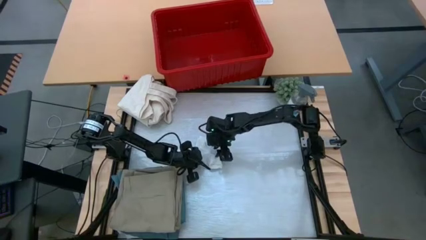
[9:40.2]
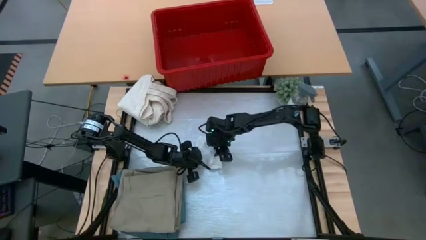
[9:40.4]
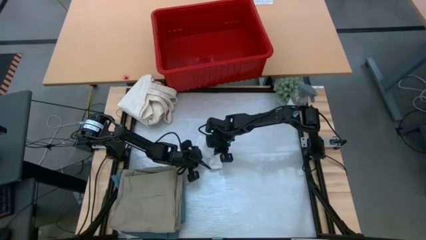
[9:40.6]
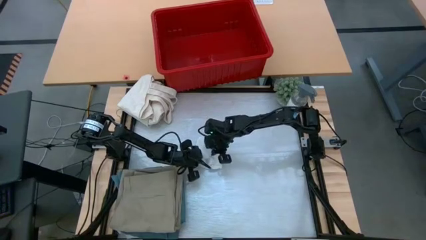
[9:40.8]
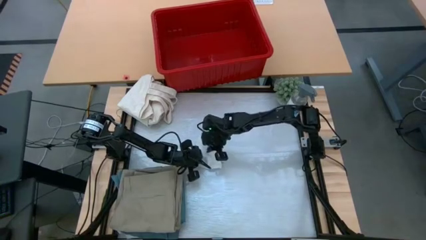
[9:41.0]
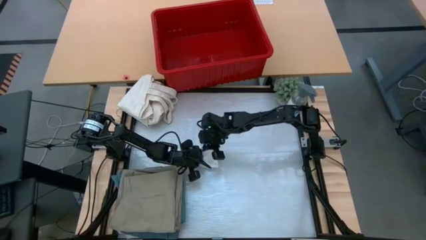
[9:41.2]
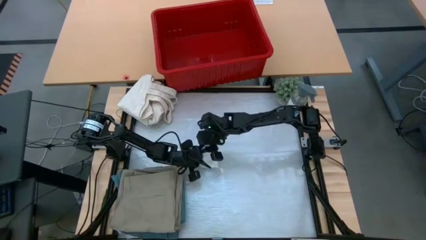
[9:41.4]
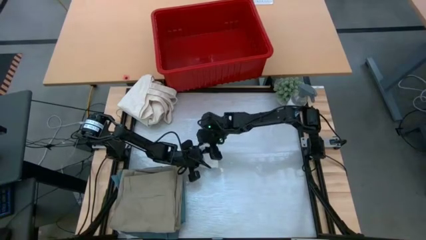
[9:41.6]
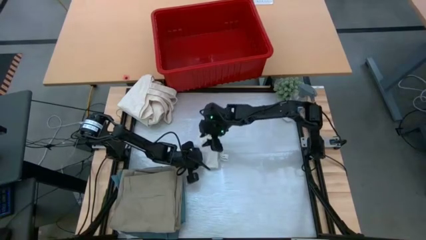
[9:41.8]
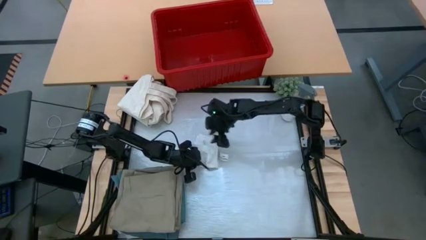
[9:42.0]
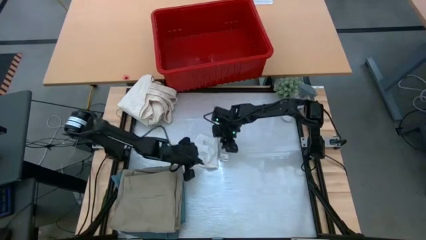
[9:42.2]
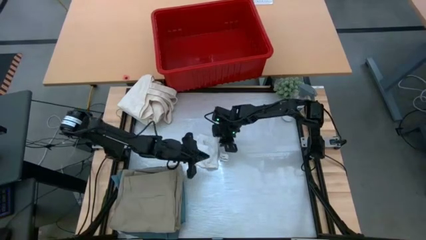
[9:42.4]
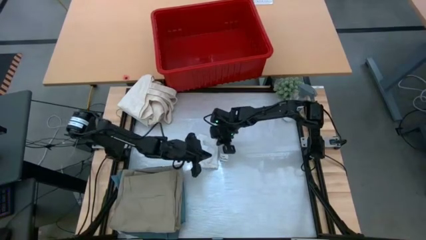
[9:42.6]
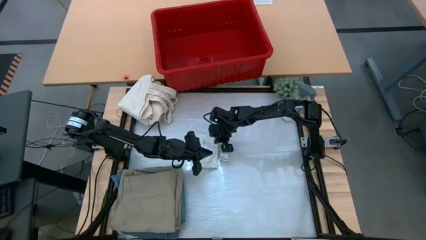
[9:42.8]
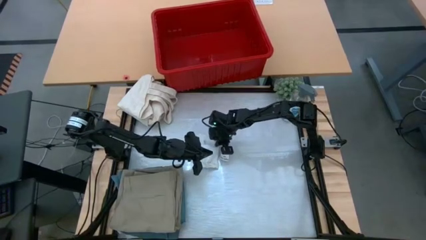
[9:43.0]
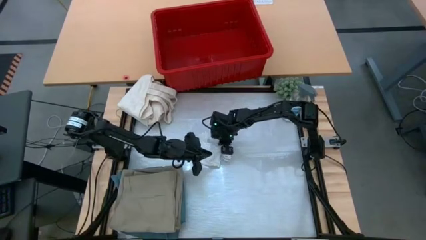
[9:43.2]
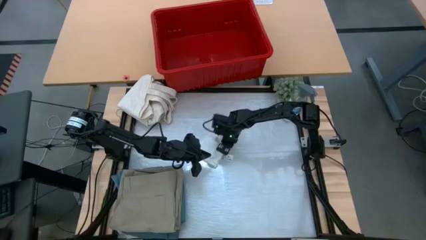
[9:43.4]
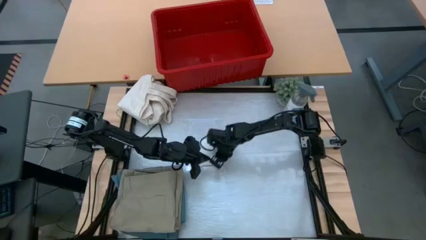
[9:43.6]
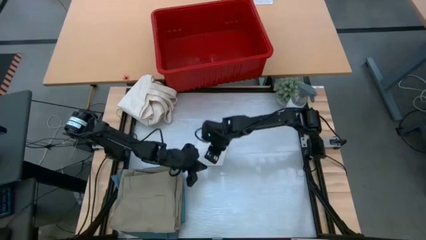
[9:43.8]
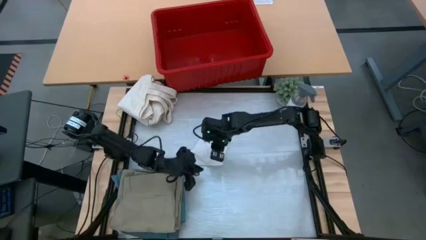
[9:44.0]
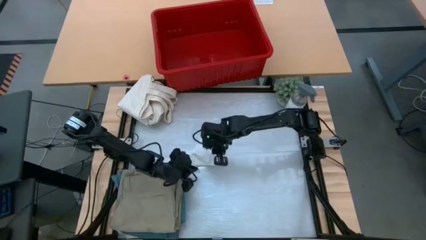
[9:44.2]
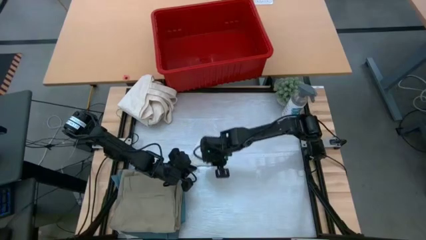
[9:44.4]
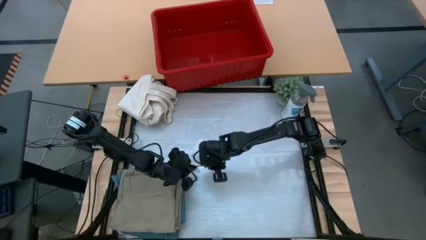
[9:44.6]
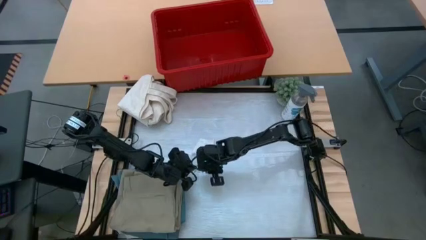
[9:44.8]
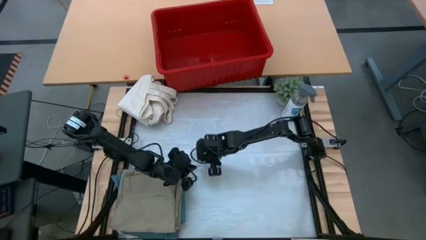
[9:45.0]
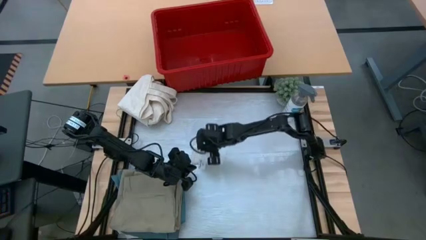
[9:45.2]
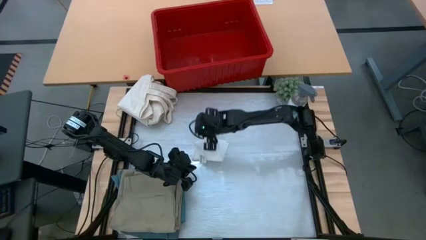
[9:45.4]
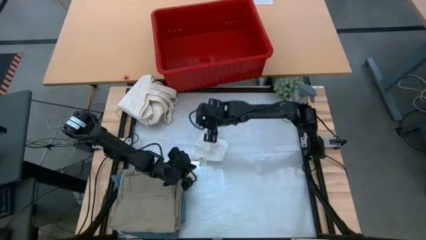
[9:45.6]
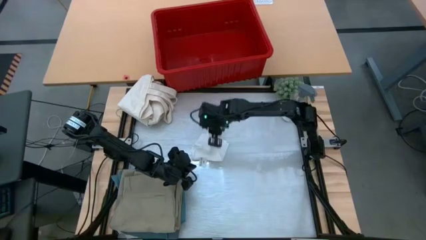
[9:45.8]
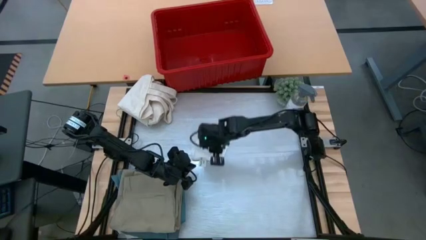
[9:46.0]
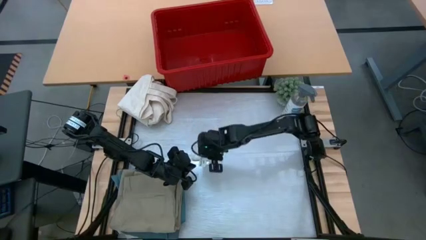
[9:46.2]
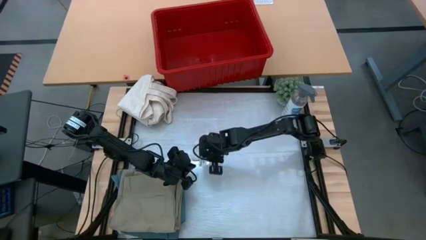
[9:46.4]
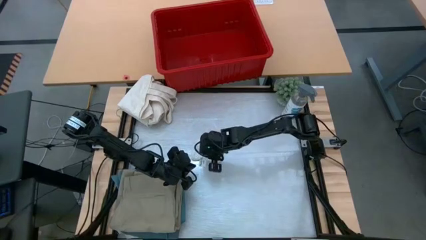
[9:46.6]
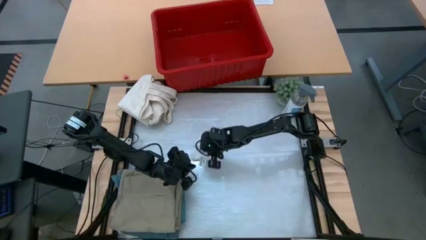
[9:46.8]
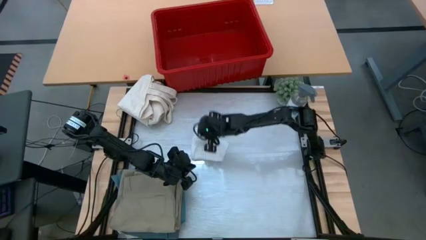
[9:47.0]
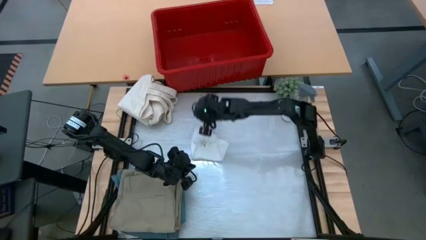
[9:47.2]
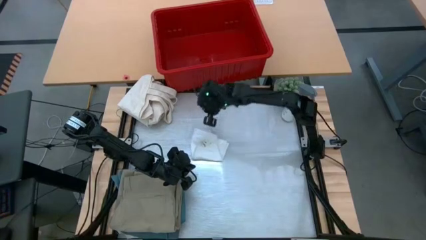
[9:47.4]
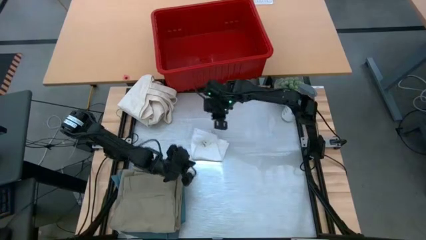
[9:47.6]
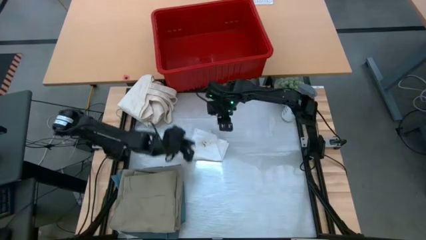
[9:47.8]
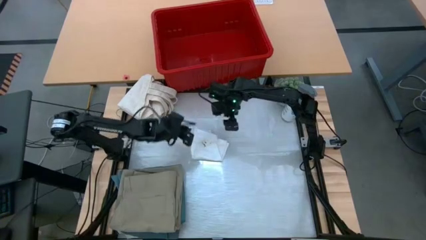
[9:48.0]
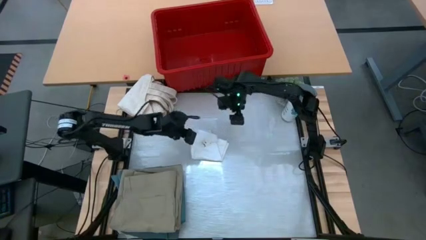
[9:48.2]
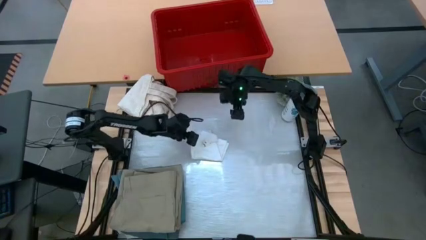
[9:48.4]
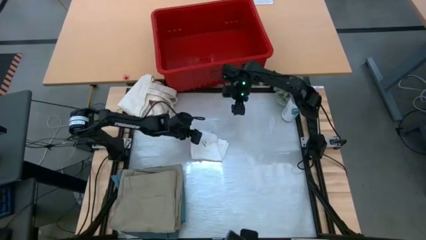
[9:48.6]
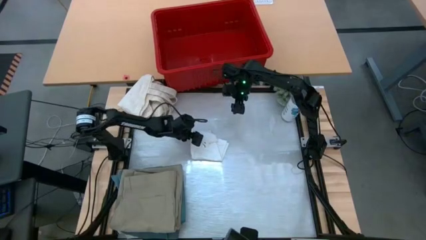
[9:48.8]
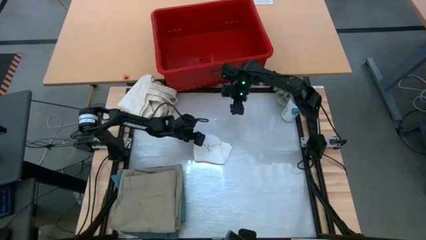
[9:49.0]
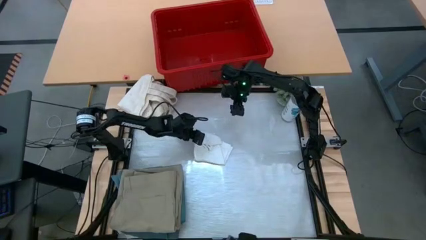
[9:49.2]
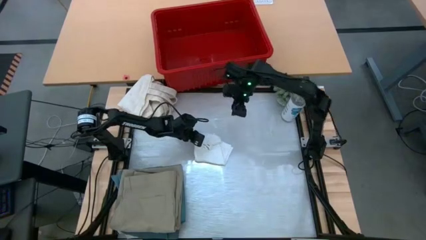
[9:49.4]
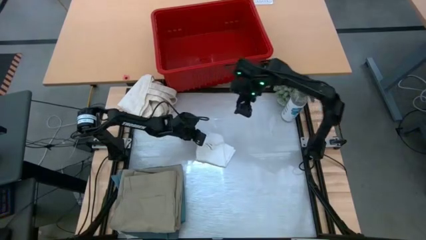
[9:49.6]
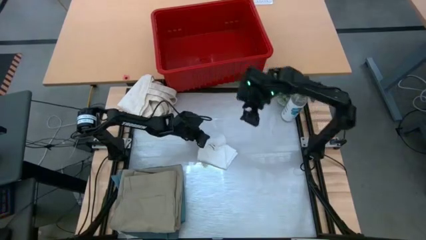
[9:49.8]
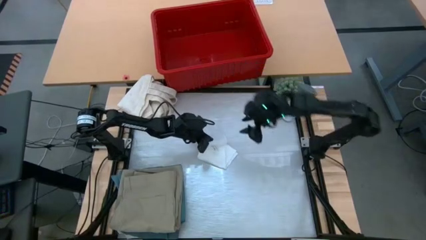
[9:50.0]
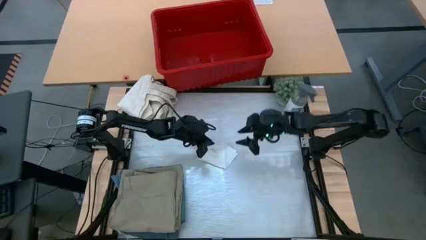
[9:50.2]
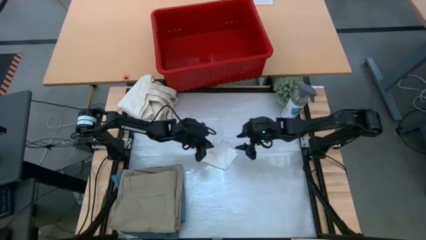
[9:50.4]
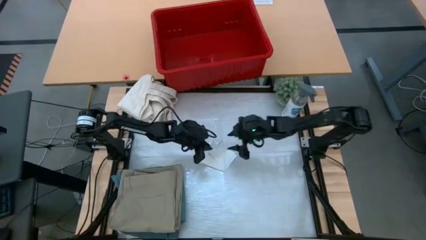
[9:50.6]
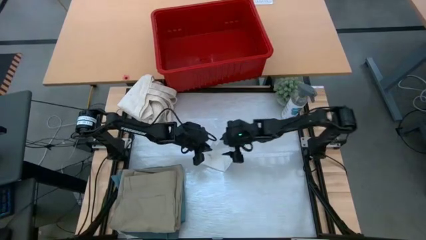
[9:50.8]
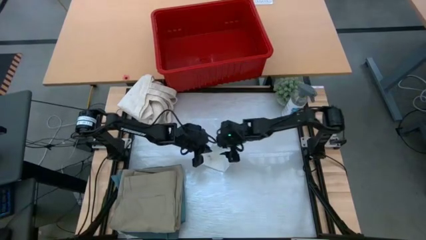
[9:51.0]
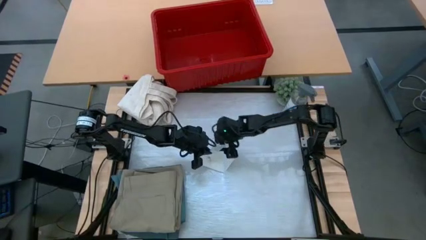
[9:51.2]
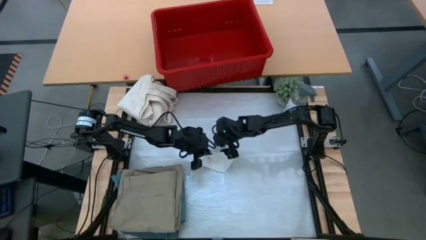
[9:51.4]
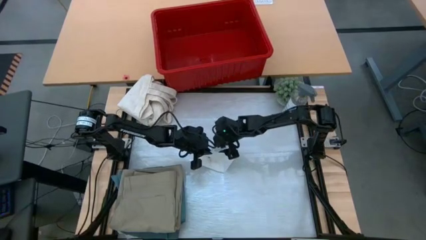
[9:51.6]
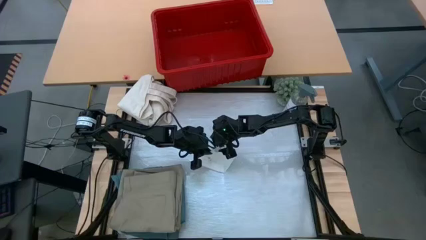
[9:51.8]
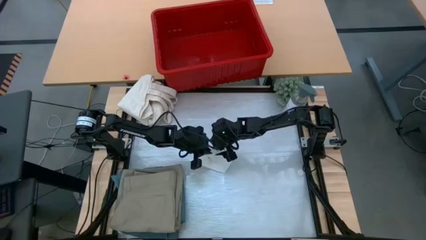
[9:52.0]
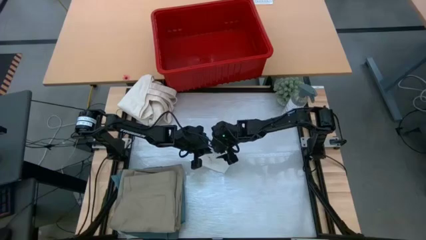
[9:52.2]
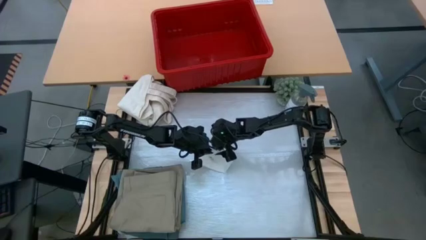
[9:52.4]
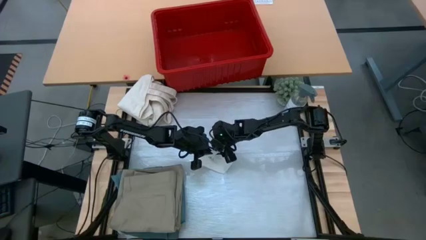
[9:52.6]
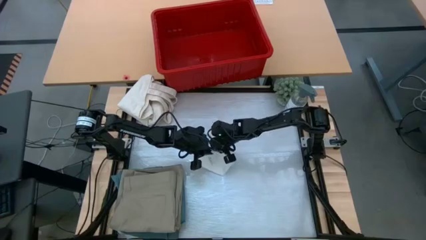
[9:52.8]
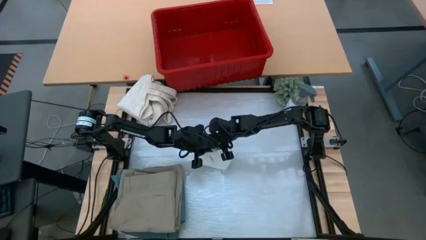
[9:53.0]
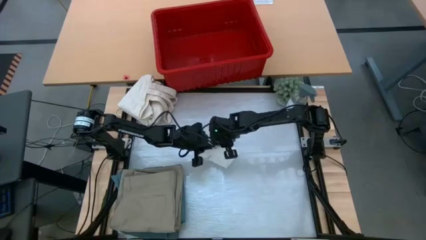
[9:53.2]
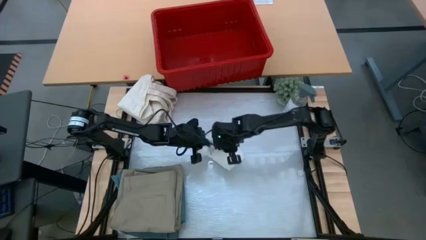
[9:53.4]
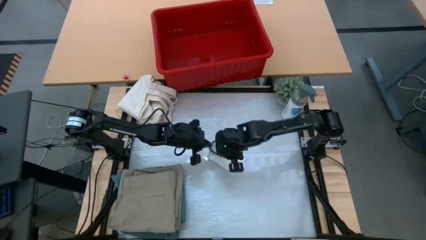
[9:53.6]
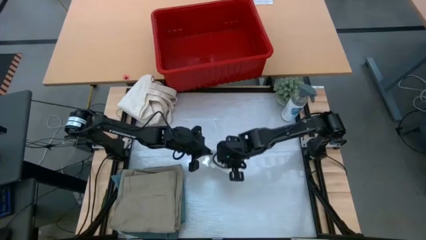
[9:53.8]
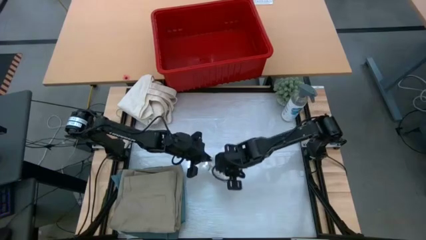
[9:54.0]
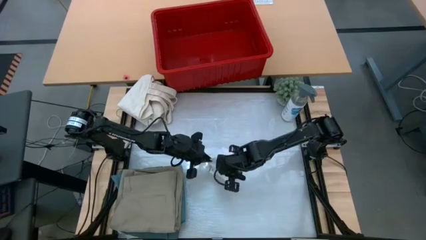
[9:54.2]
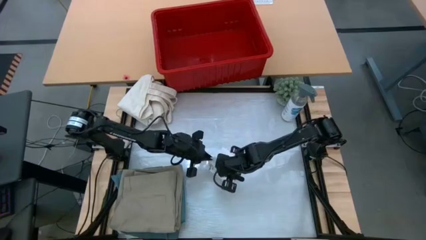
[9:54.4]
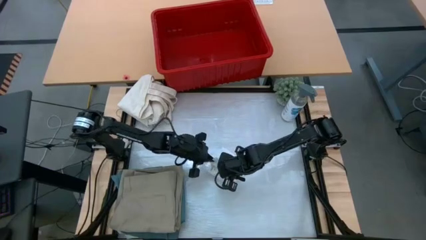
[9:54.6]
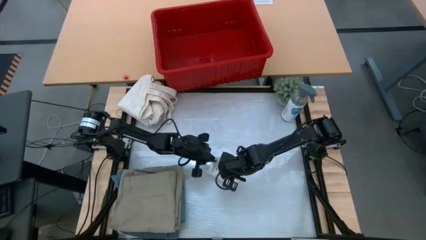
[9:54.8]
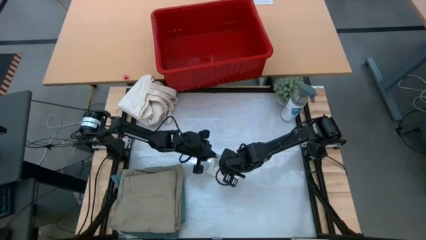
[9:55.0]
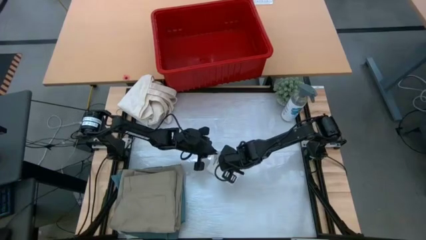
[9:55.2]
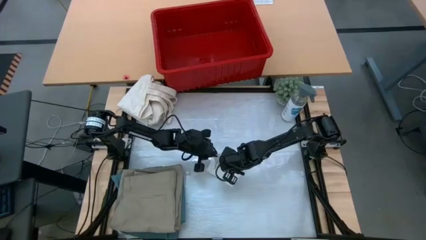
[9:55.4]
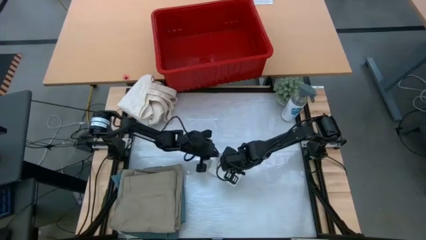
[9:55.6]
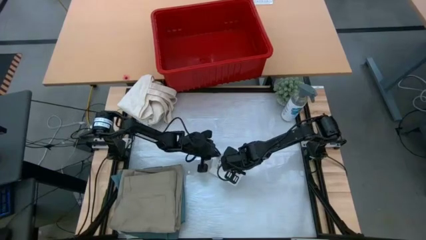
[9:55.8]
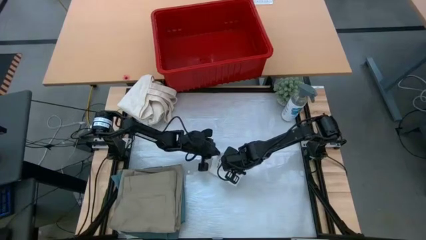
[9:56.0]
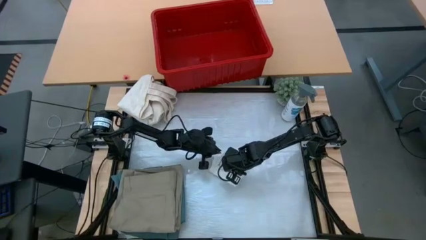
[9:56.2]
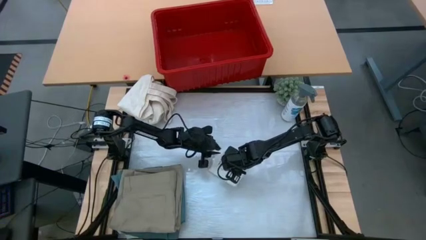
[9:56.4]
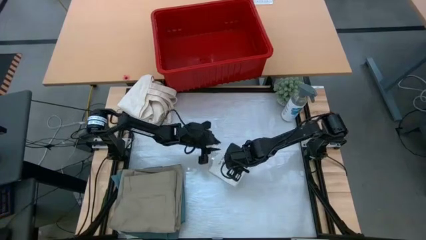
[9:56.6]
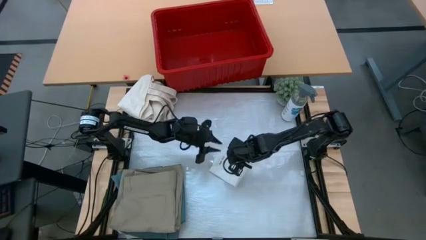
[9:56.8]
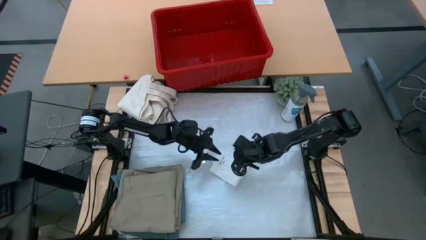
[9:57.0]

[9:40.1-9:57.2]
Task: Fold Laundry from Bin
Fold the white underwear
